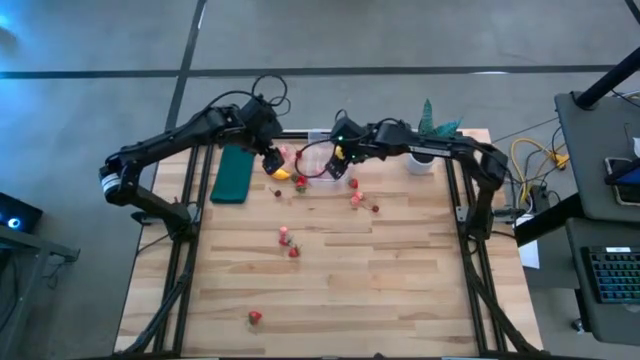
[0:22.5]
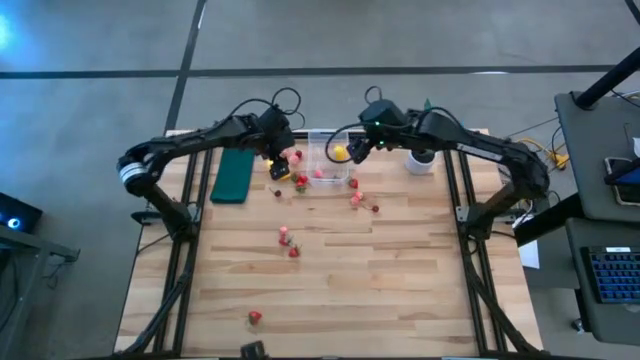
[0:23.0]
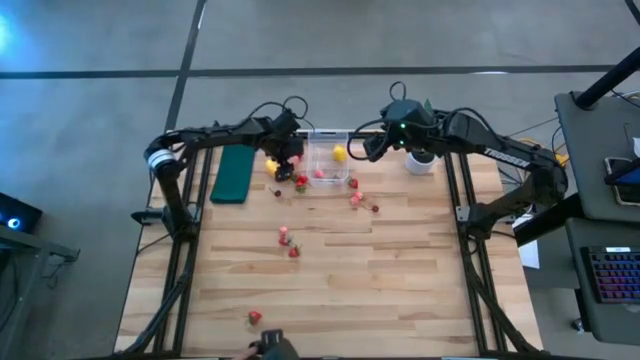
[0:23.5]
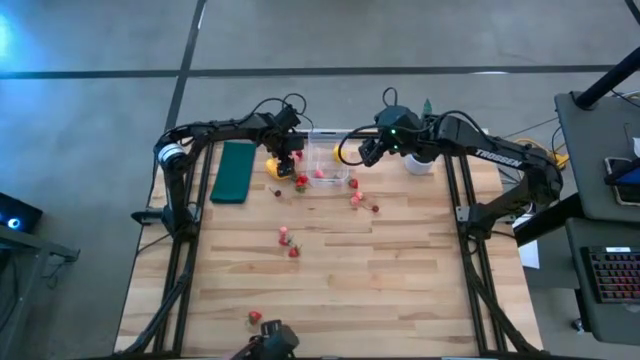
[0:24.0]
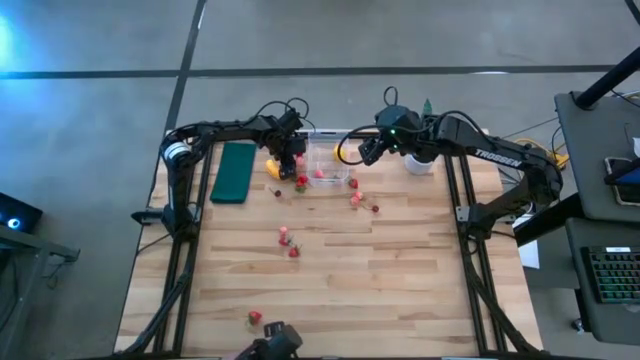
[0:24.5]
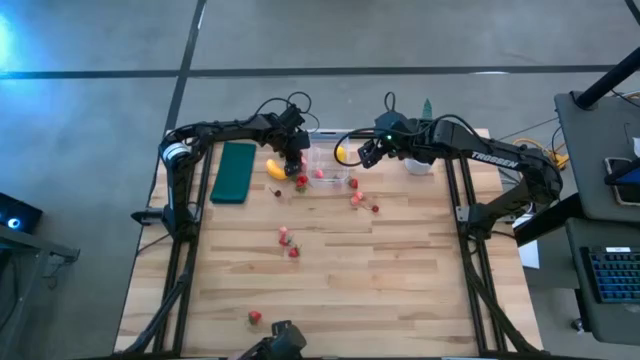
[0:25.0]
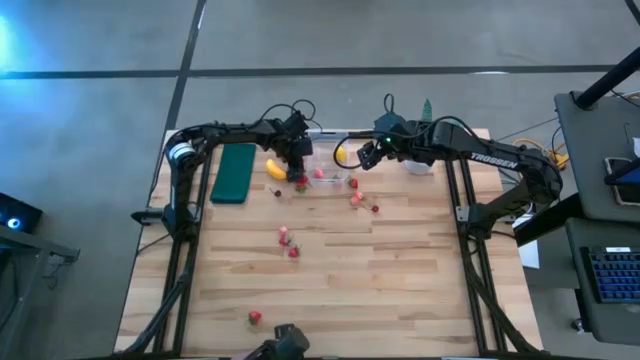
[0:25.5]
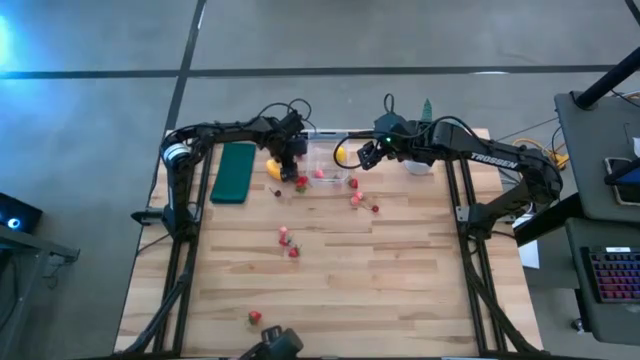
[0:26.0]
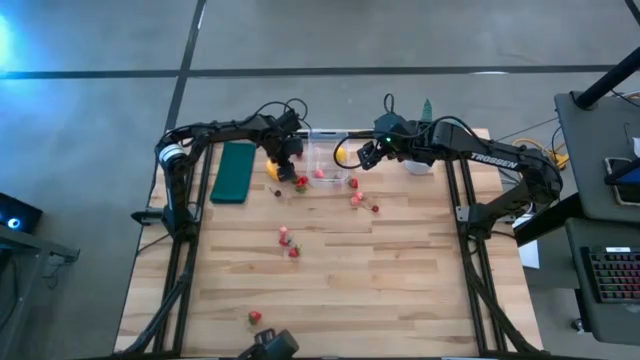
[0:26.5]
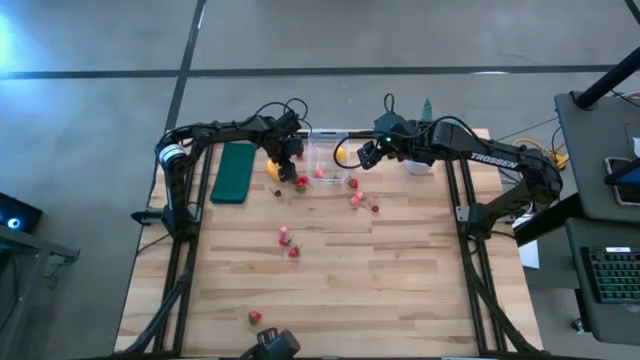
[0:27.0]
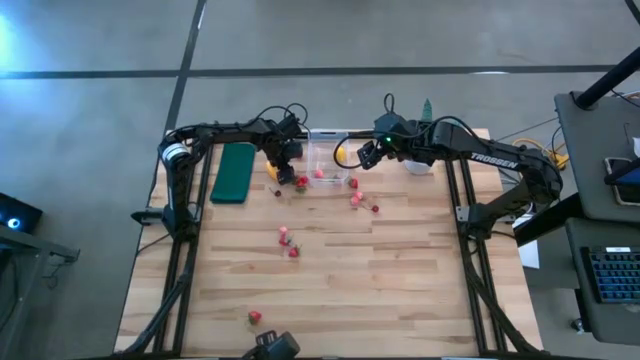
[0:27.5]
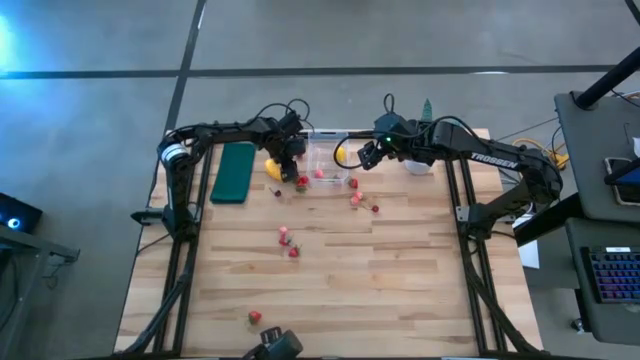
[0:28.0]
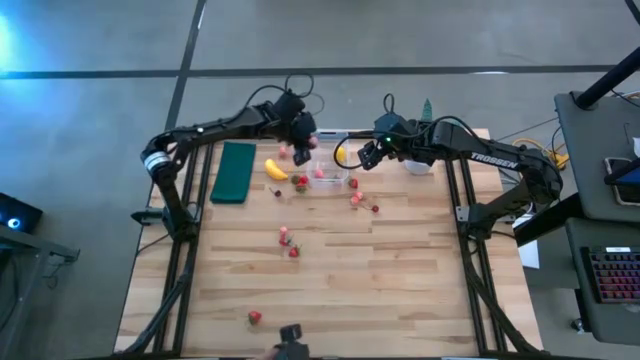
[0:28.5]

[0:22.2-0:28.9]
Task: Pick and placing Produce into tupperware
Put the pink peach into the transparent bin

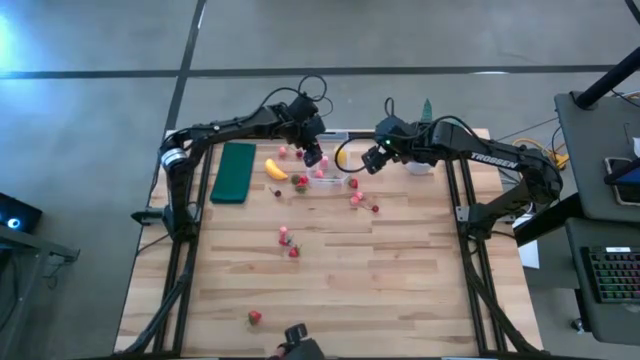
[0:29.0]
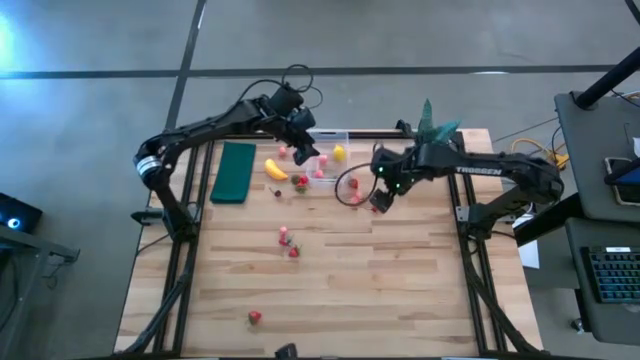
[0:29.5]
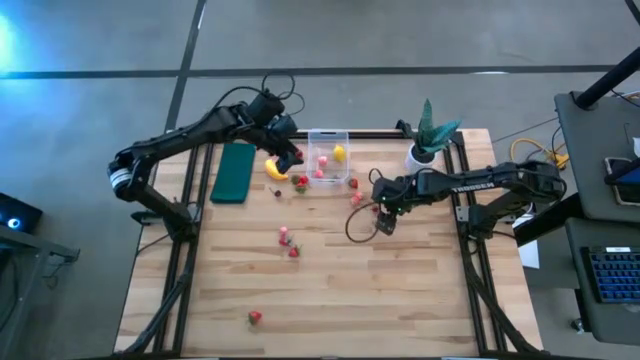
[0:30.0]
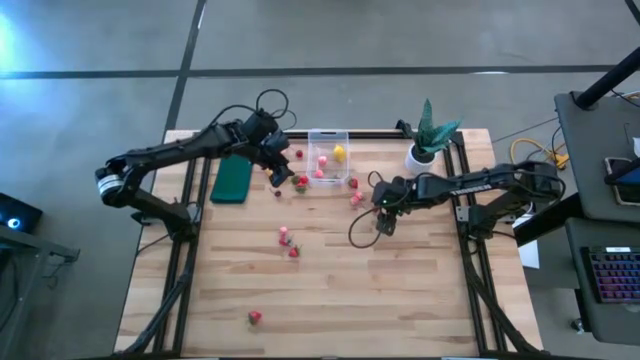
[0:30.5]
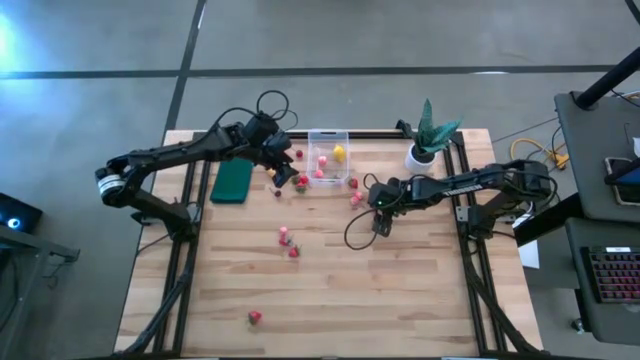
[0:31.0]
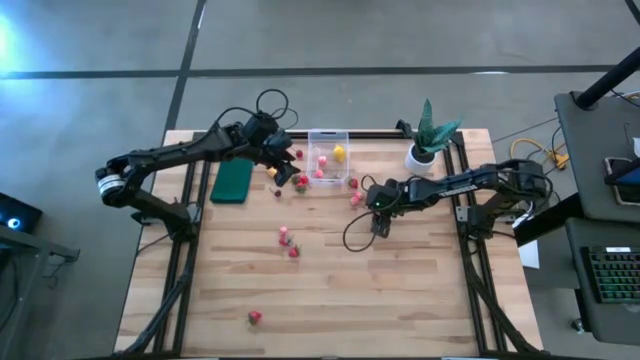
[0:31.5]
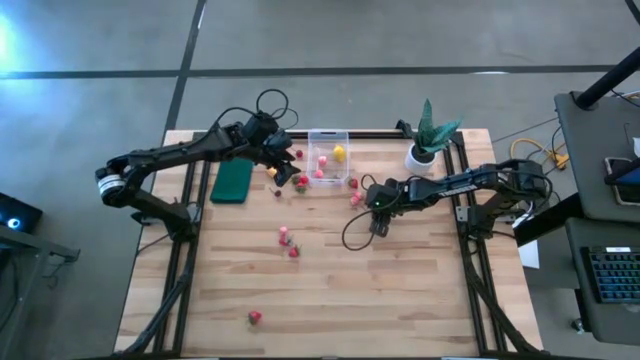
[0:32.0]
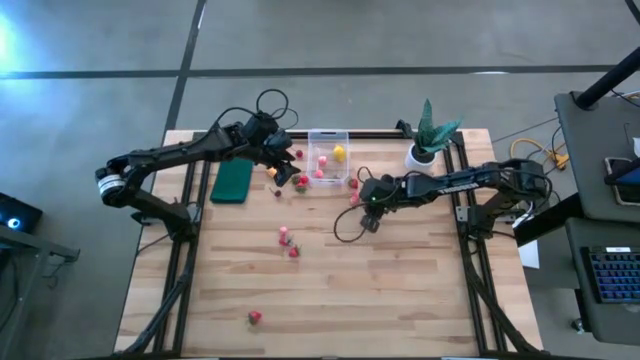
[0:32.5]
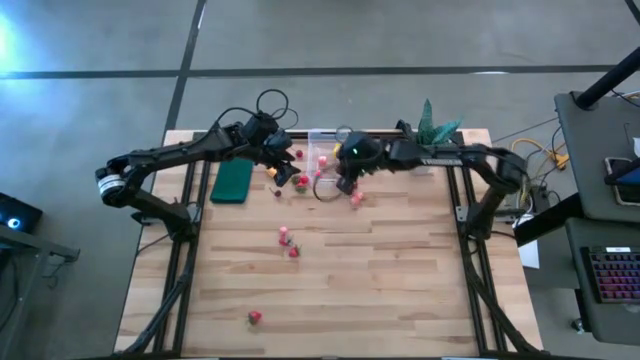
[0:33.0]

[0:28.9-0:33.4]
Put the red cherry into the transparent bin

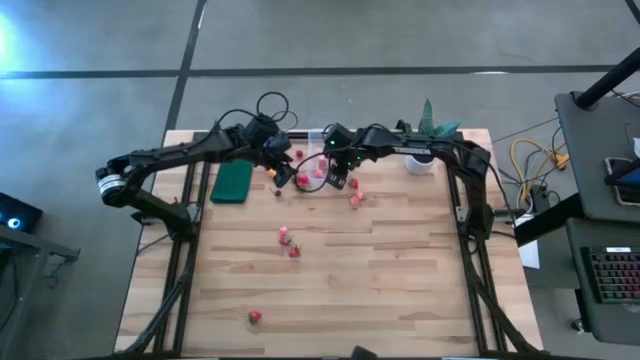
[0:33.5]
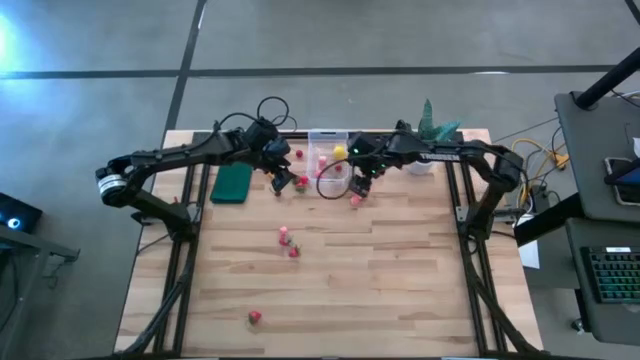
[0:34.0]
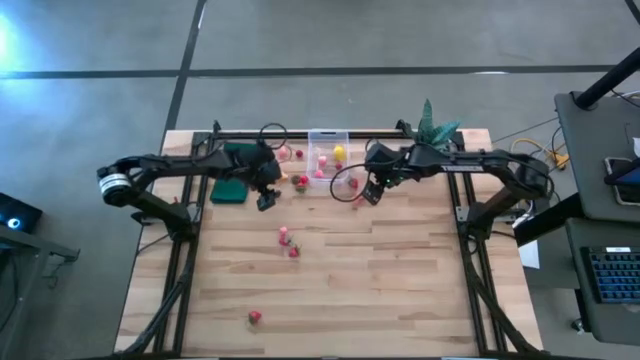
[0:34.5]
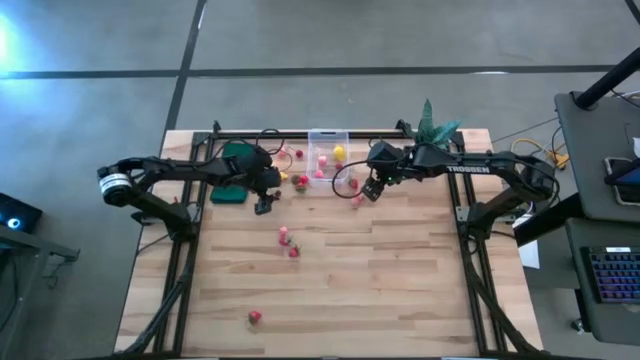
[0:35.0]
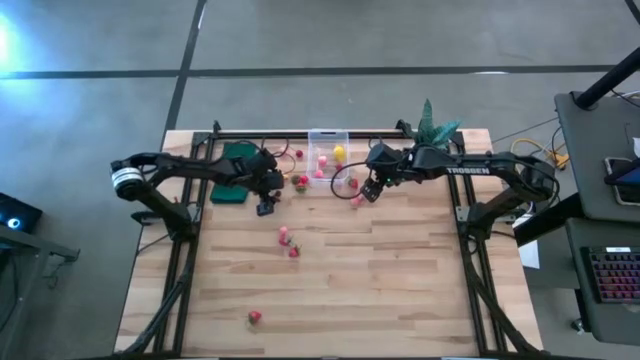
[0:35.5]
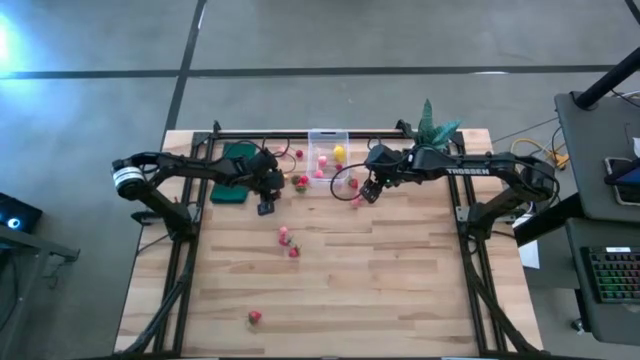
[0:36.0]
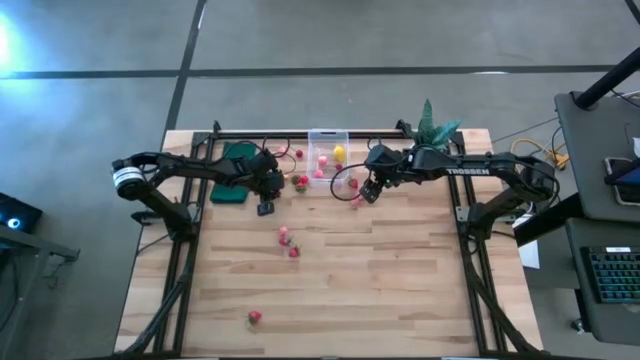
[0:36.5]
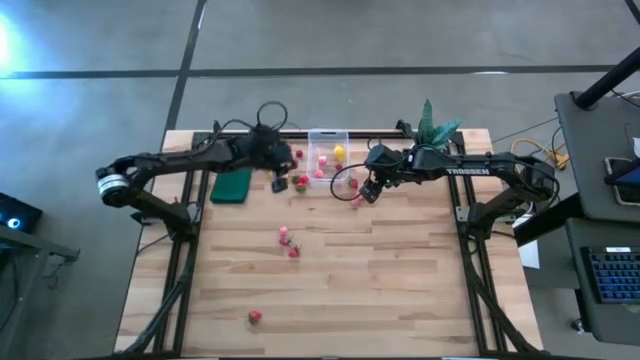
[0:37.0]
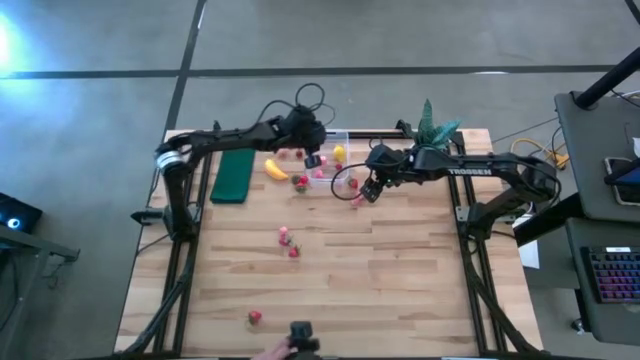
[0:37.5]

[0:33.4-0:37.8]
Put the red cherry into the transparent bin

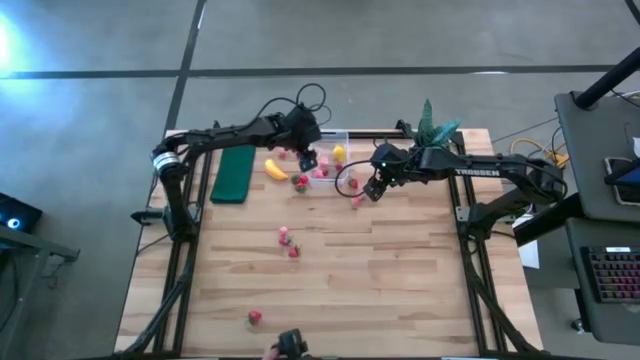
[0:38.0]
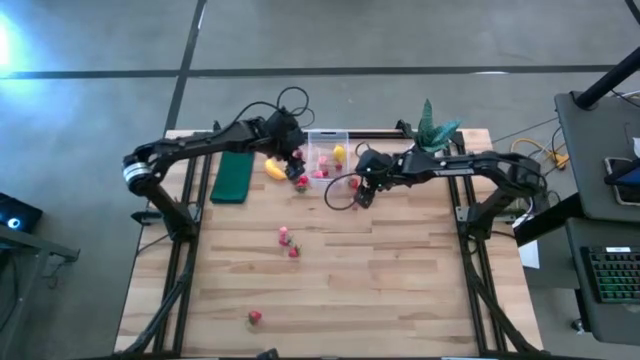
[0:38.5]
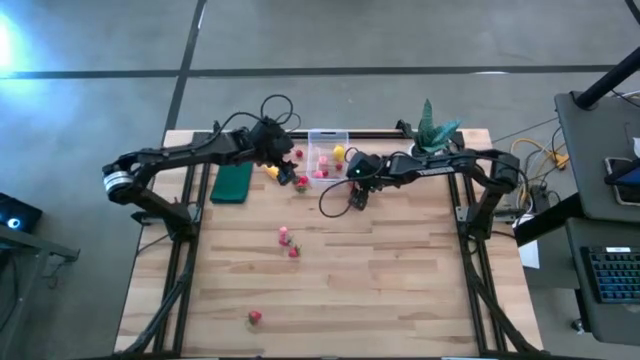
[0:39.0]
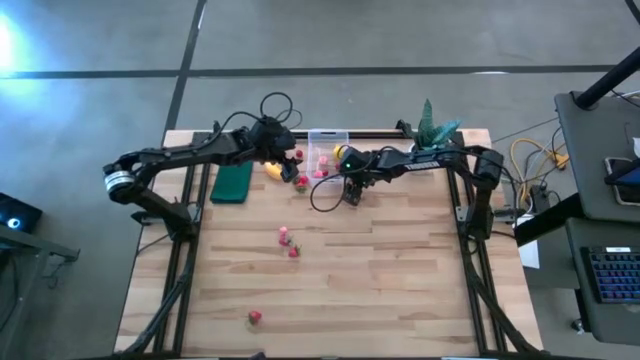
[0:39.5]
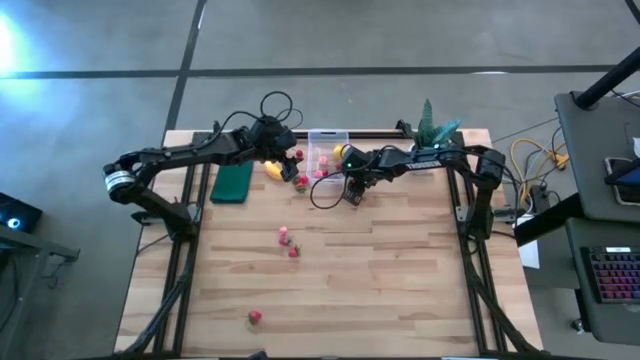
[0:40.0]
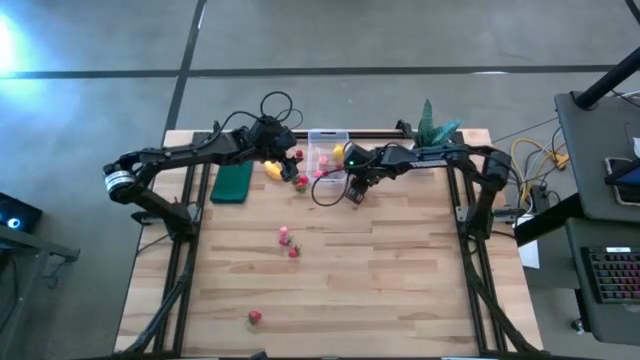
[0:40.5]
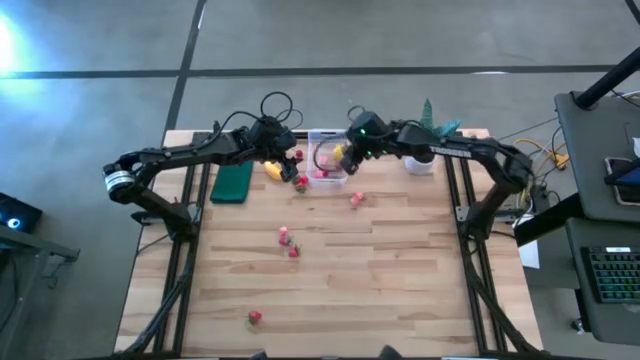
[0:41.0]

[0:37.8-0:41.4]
Put the red strawberry into the transparent bin

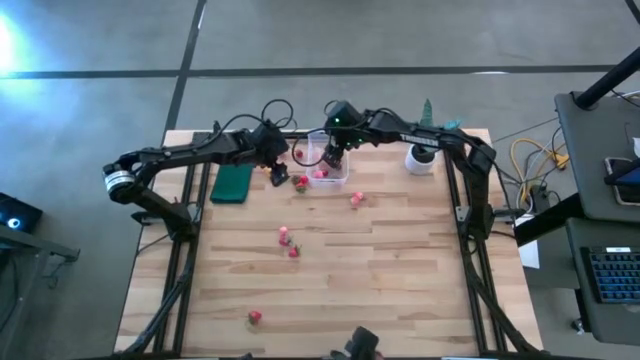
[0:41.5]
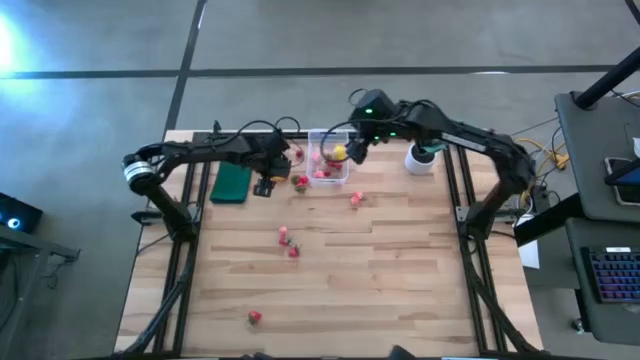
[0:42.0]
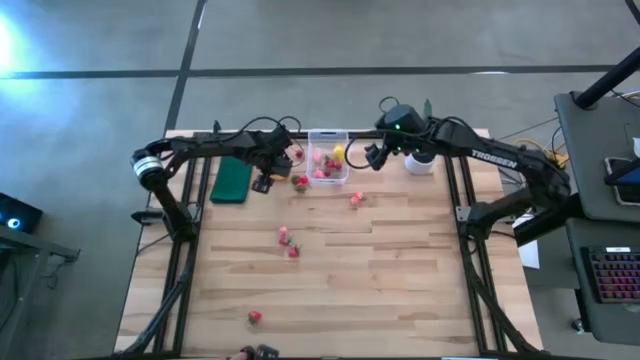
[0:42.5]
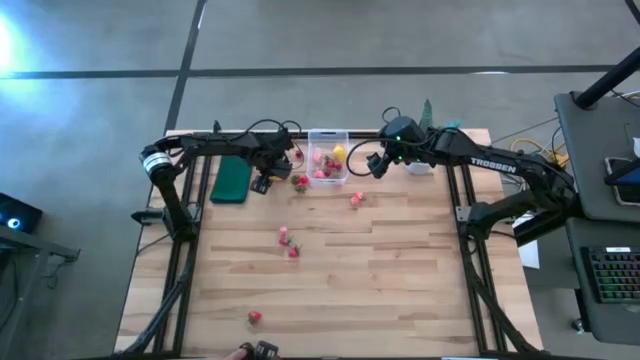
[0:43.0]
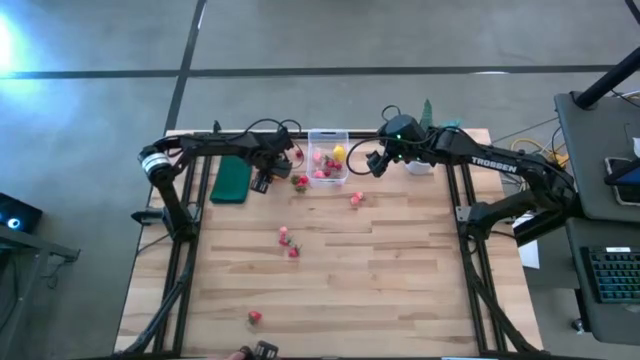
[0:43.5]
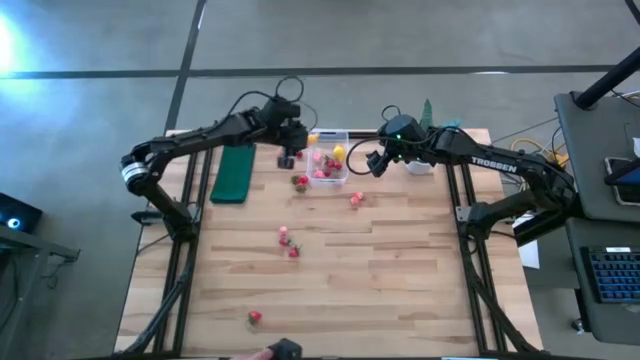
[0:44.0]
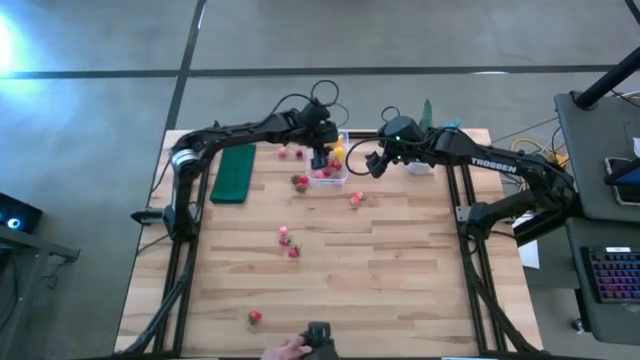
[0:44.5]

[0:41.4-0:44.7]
Put the yellow banana into the transparent bin
